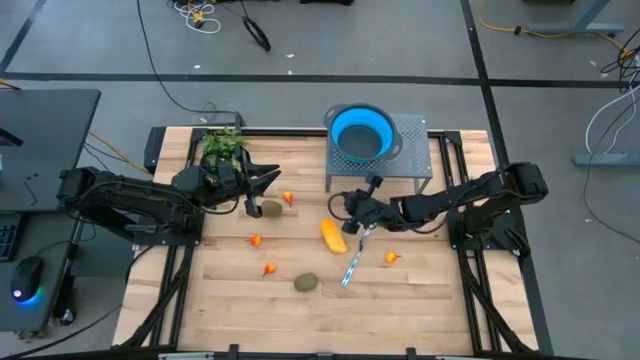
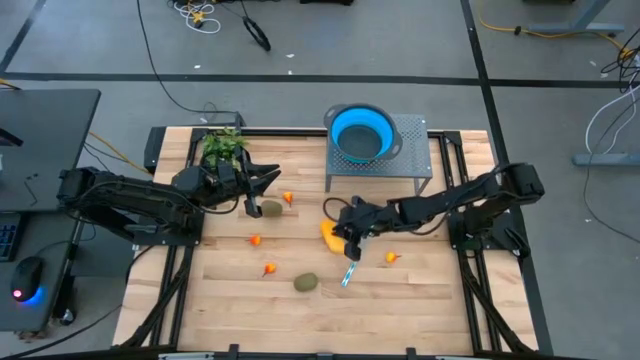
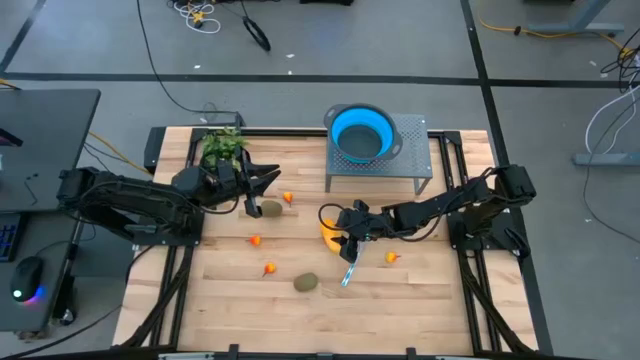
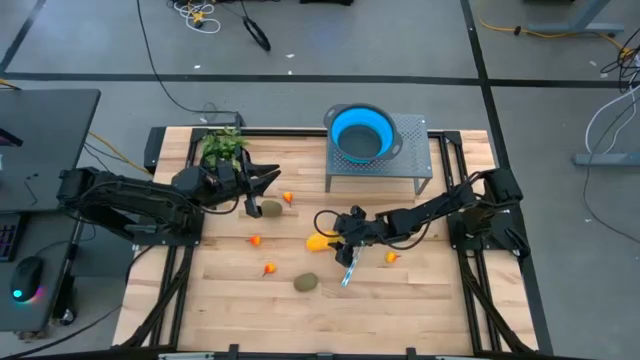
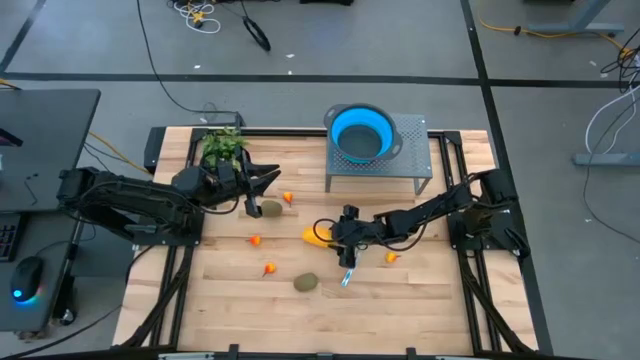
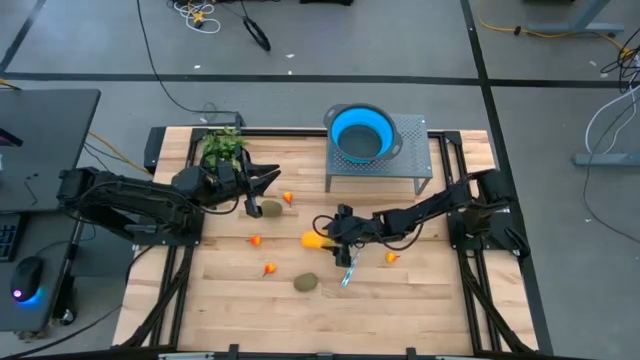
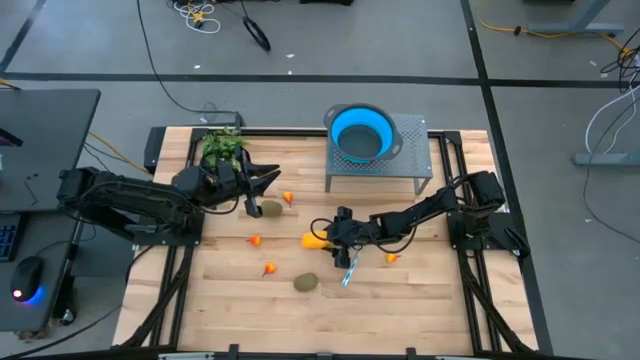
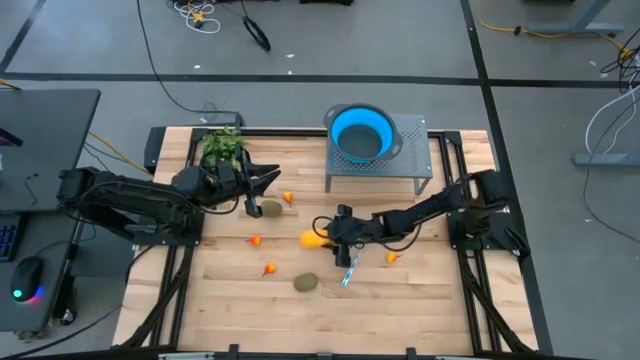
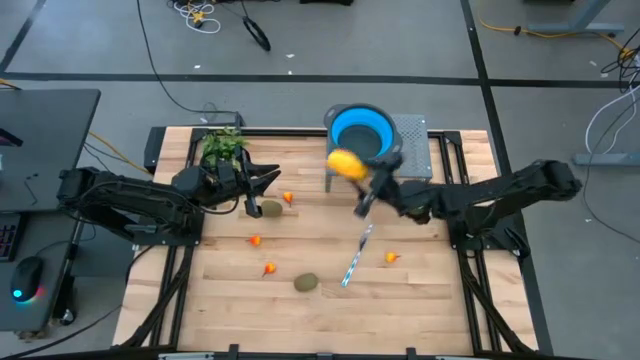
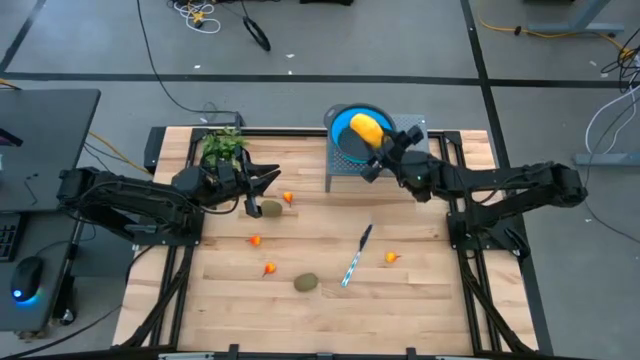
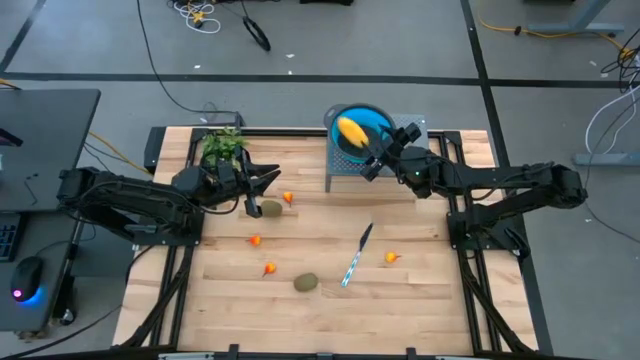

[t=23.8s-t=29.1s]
Task: Pick & Place Fruit
Put the mango into the blue strainer bowl on the shelf

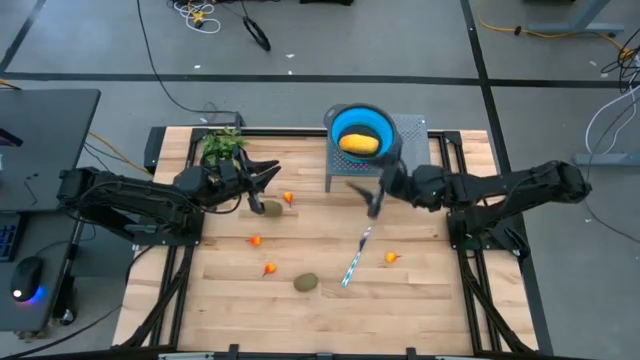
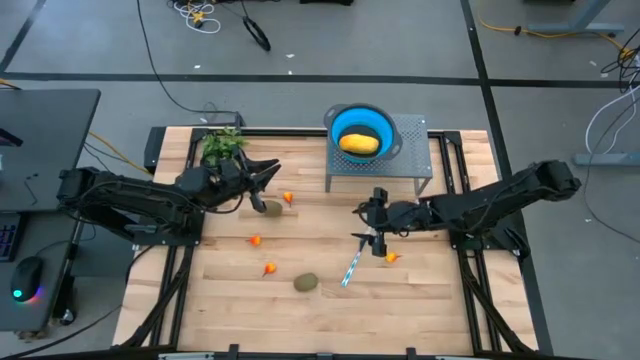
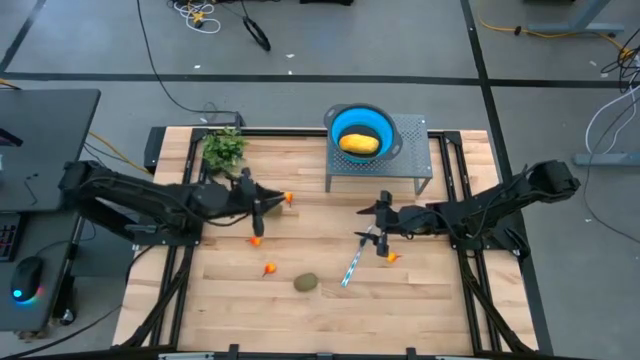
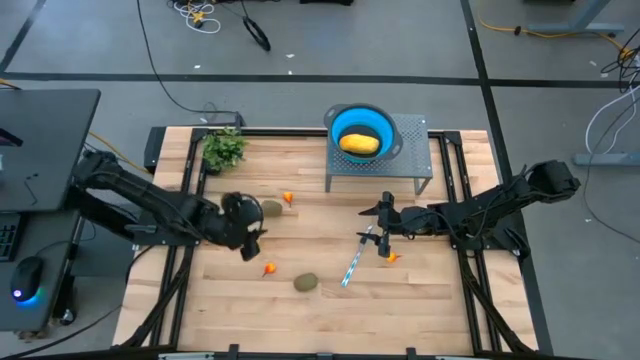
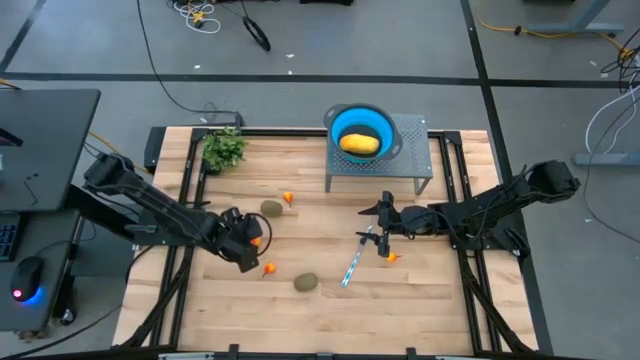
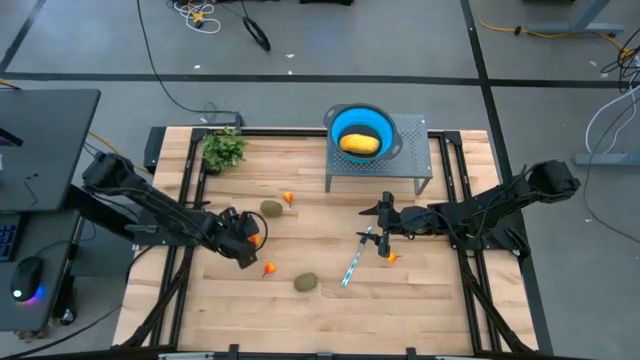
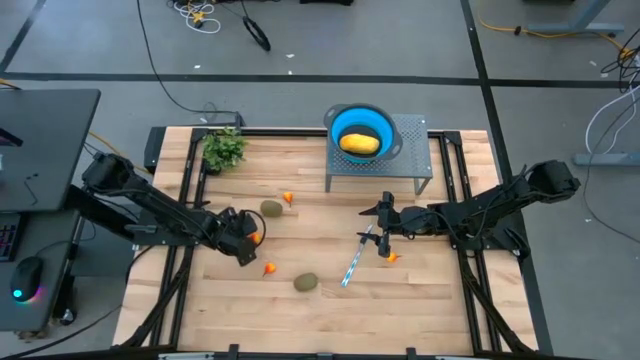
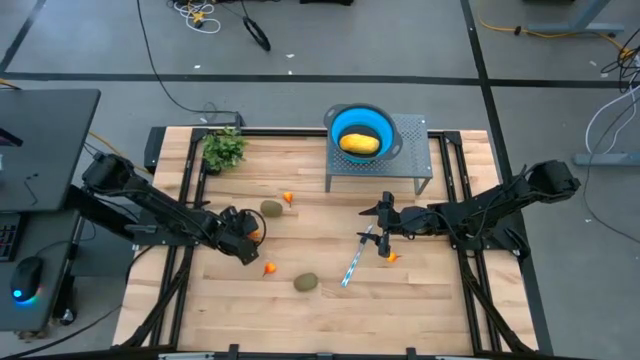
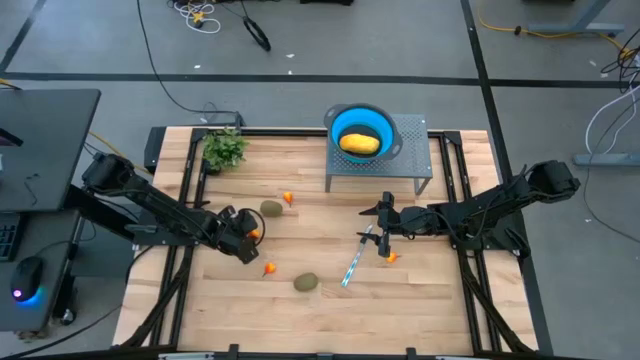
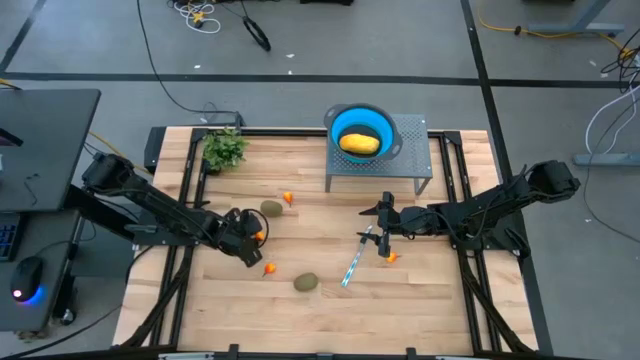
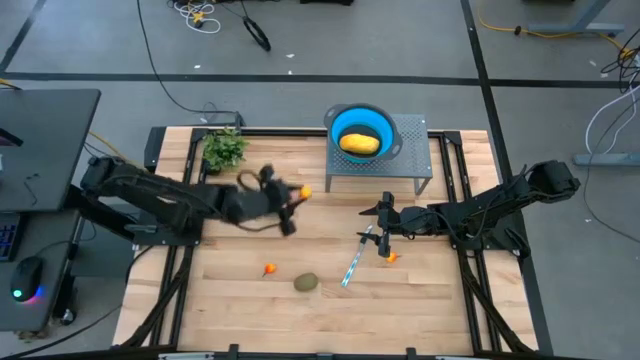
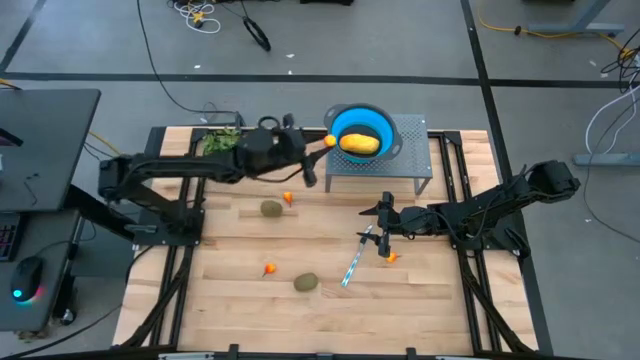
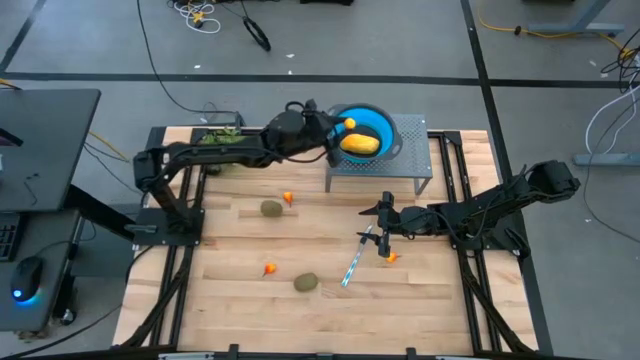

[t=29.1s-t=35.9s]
Put the peach into the blue strainer bowl on the shelf

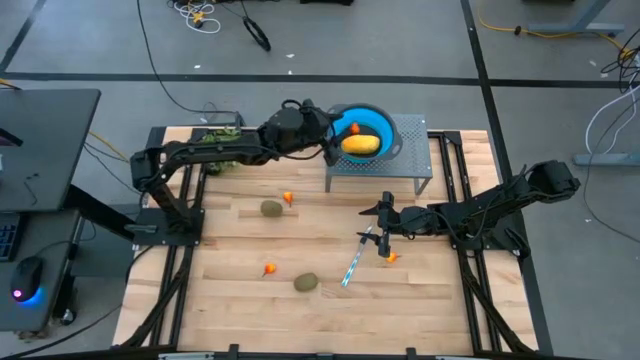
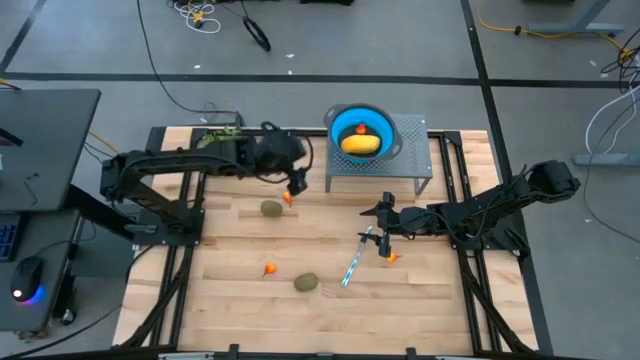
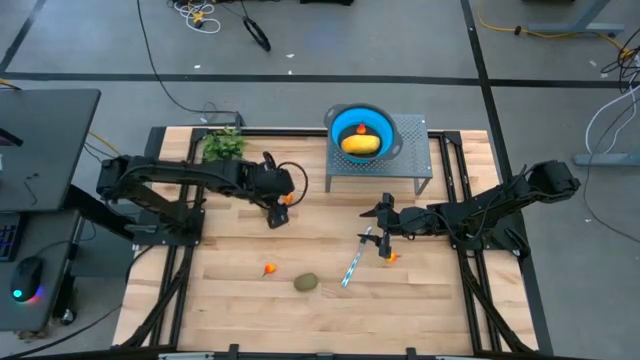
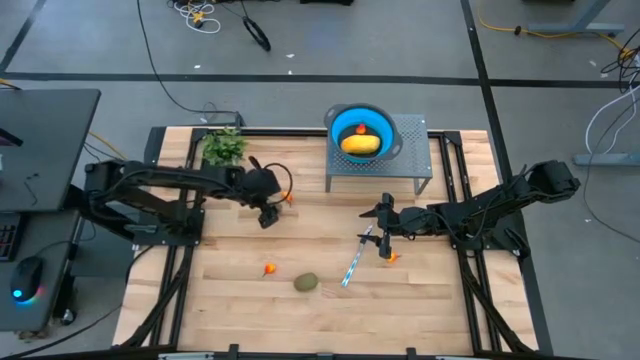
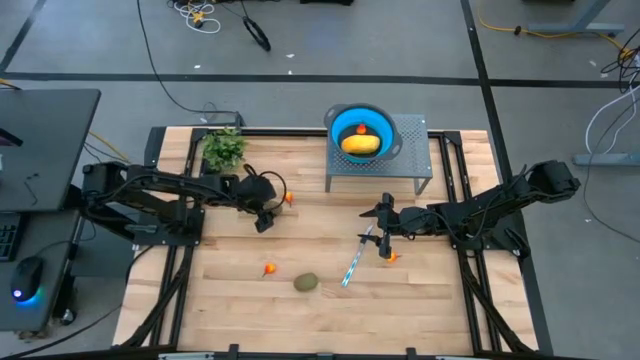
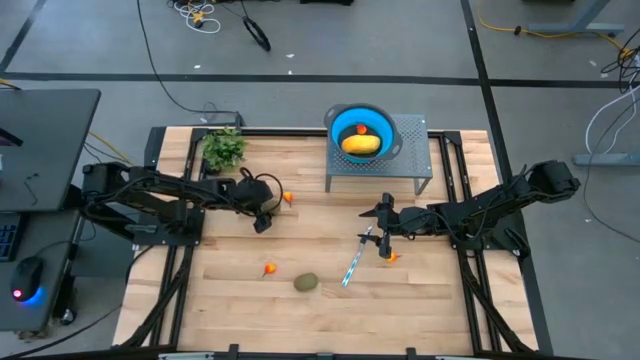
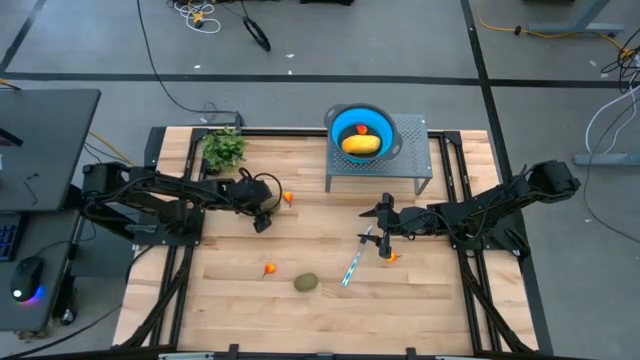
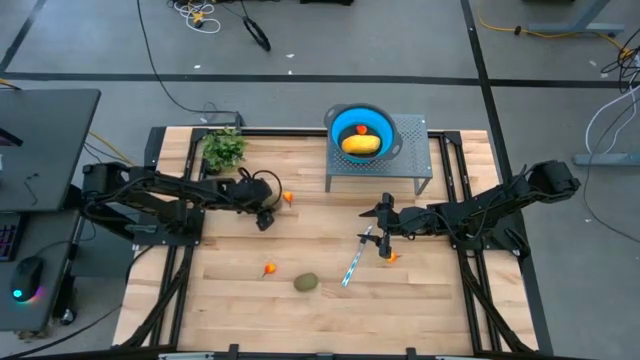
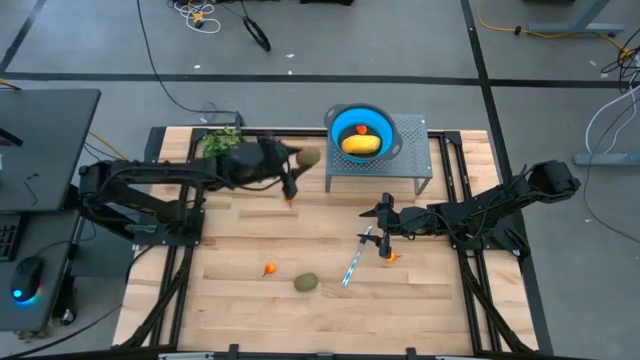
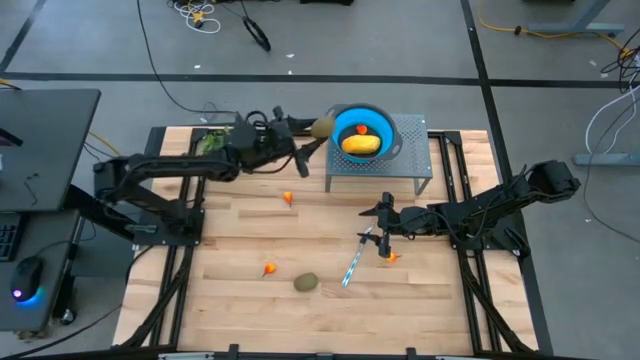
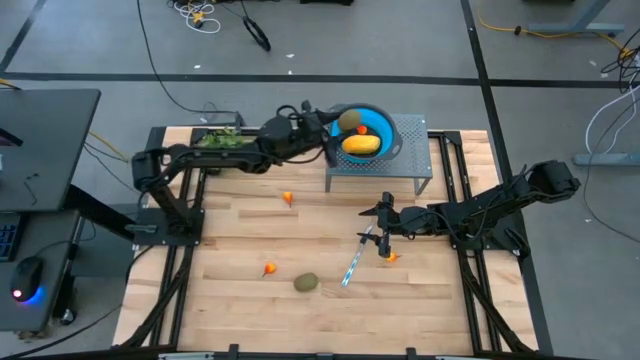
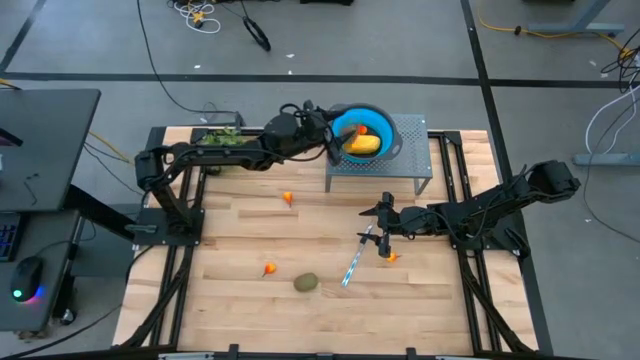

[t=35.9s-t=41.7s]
Put the kiwi into the blue strainer bowl on the shelf

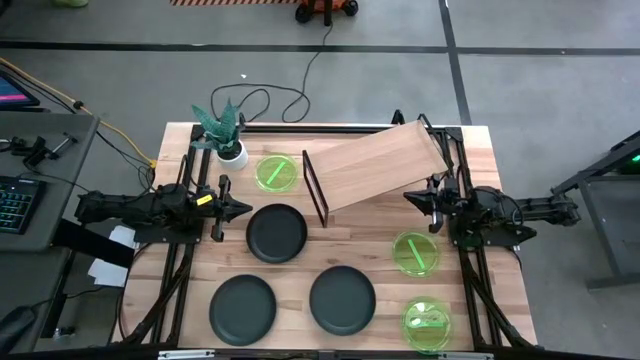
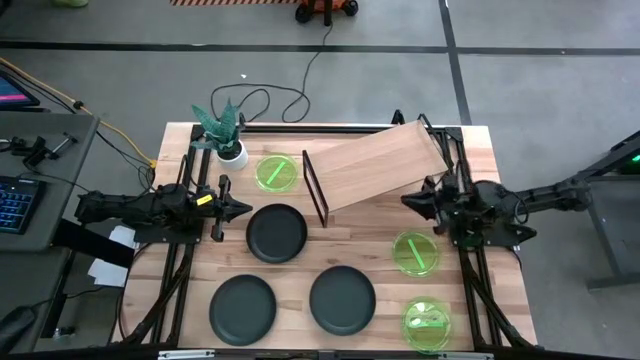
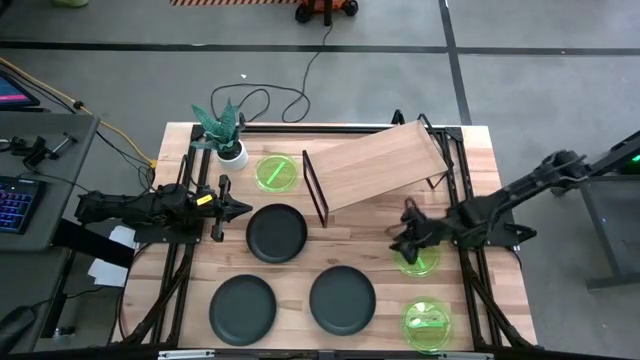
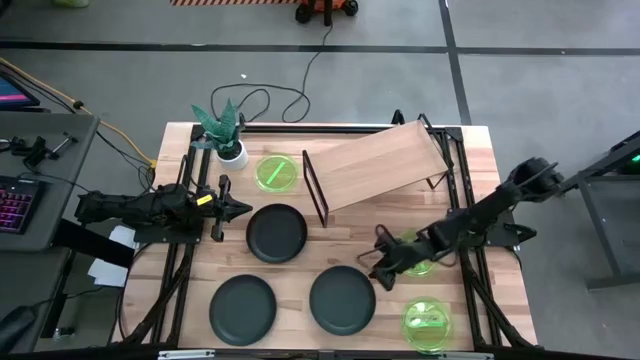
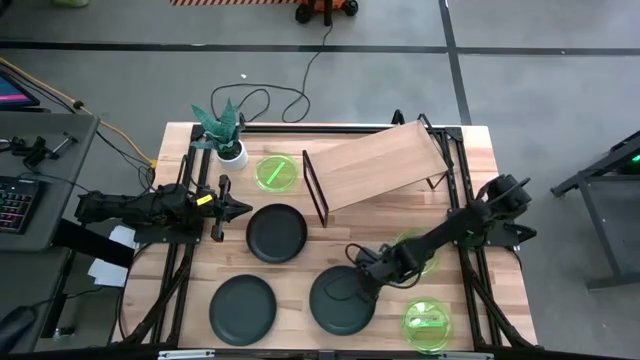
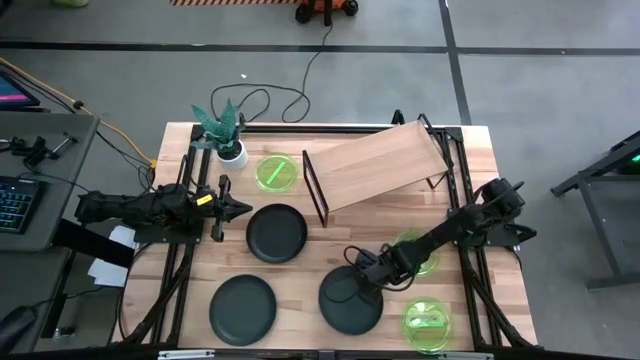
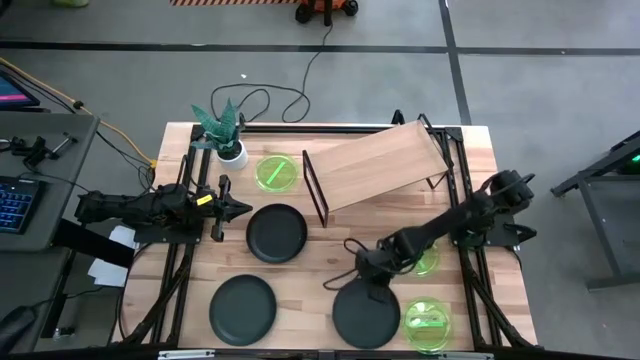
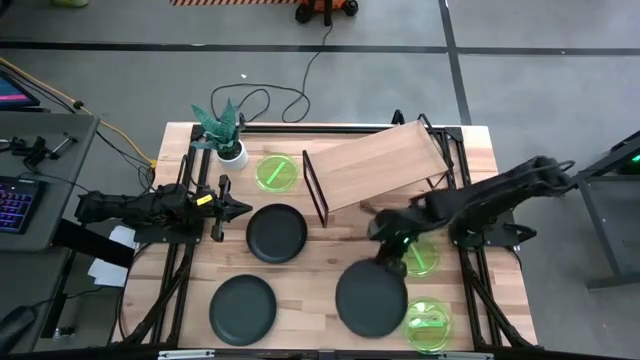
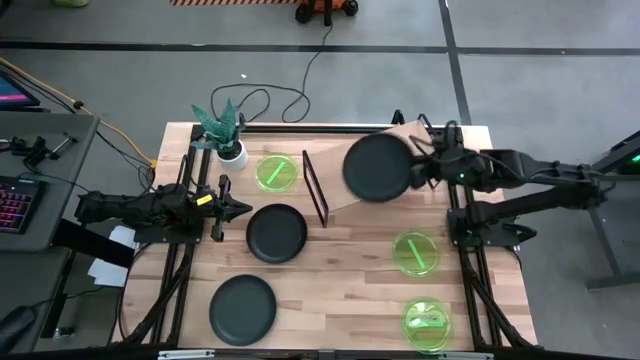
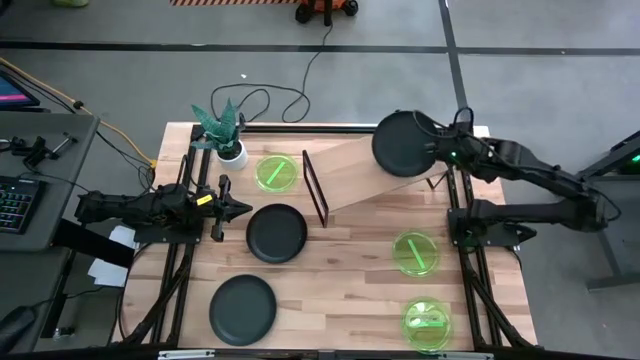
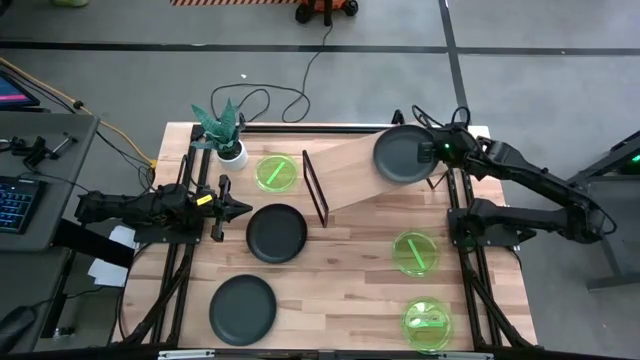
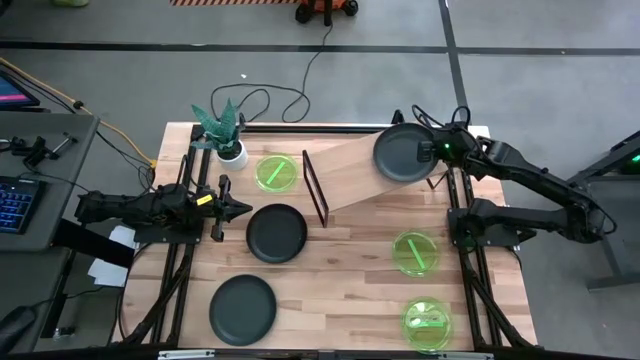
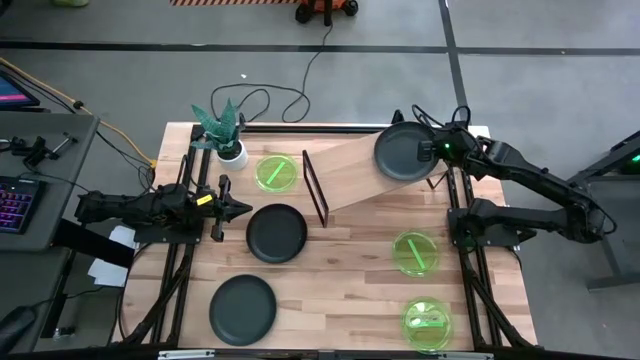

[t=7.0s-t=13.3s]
Task: Place and stack plates onto a shelf
Put the bottom right black plate on the shelf
